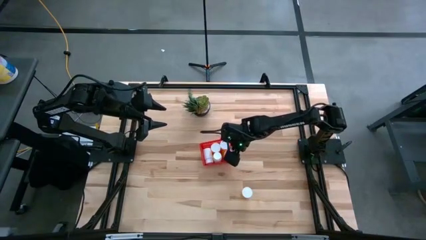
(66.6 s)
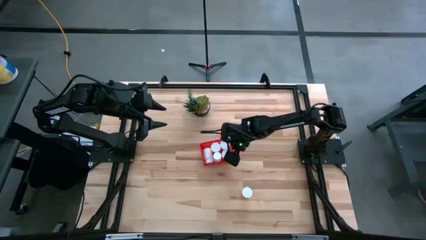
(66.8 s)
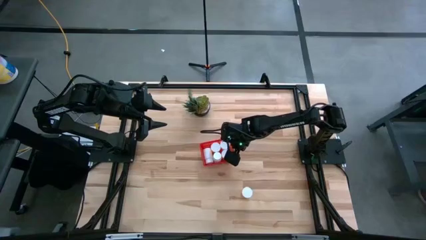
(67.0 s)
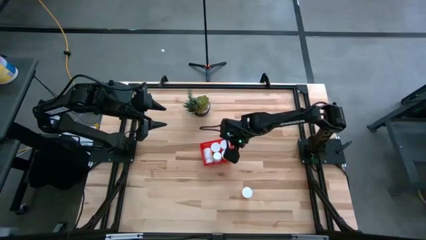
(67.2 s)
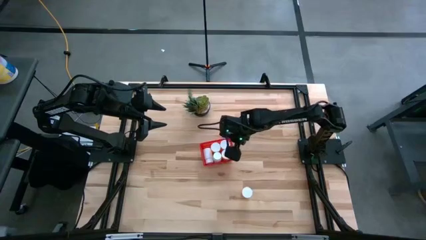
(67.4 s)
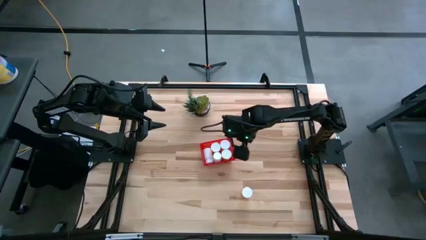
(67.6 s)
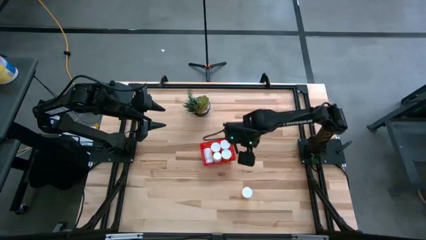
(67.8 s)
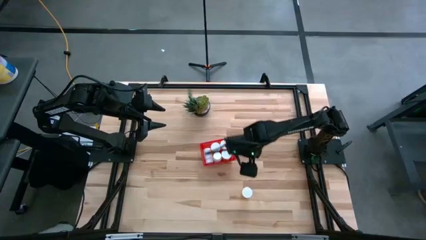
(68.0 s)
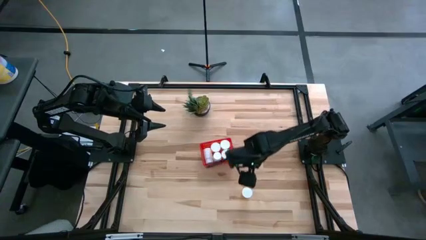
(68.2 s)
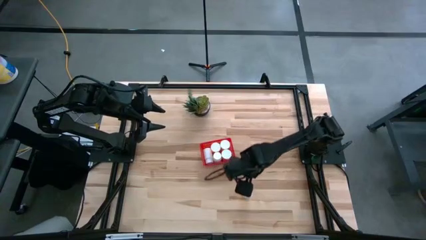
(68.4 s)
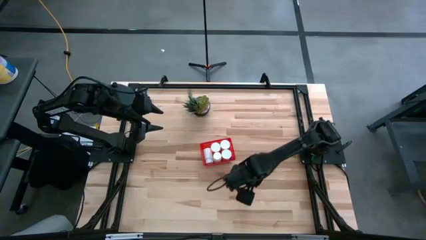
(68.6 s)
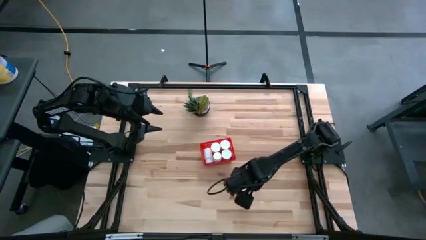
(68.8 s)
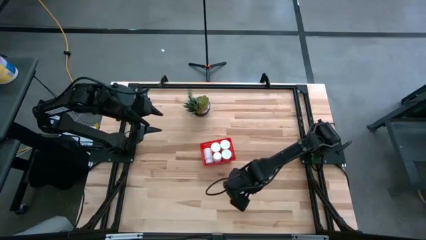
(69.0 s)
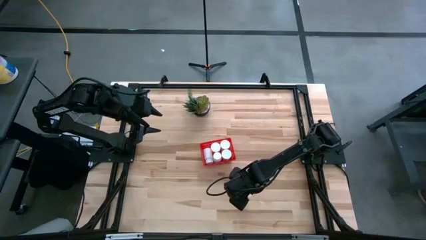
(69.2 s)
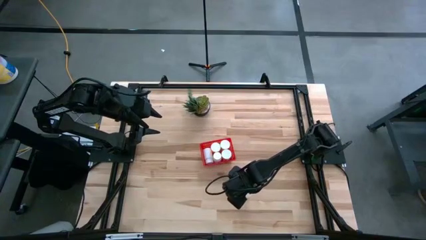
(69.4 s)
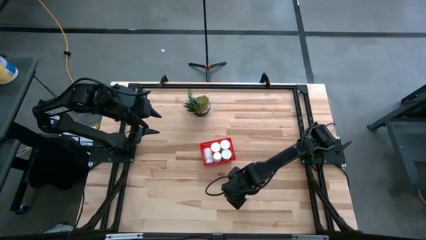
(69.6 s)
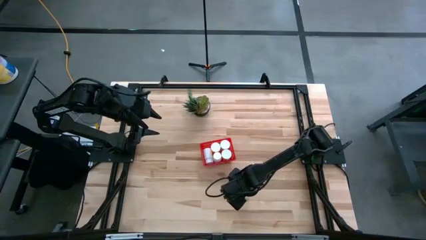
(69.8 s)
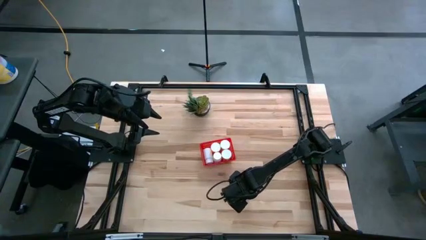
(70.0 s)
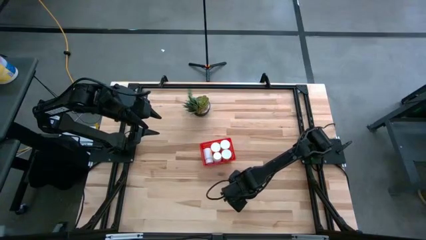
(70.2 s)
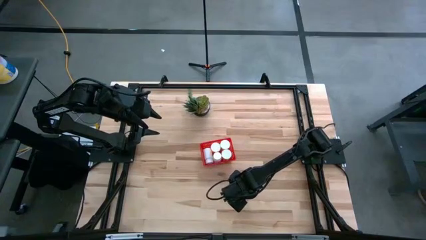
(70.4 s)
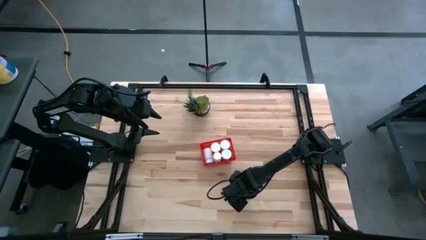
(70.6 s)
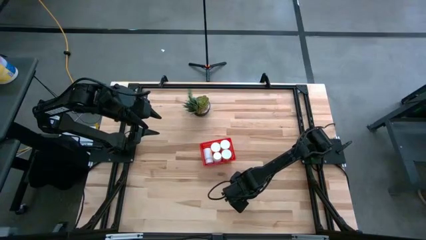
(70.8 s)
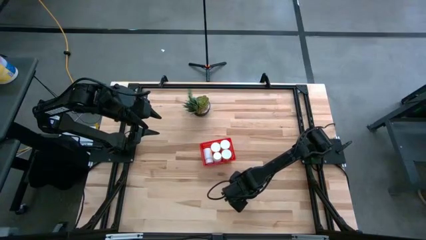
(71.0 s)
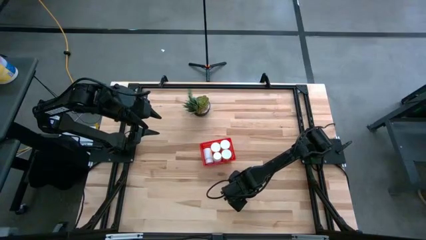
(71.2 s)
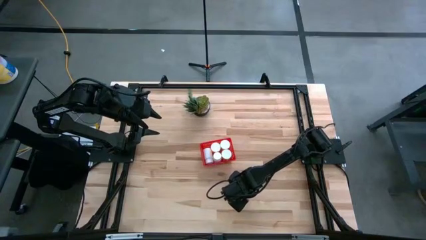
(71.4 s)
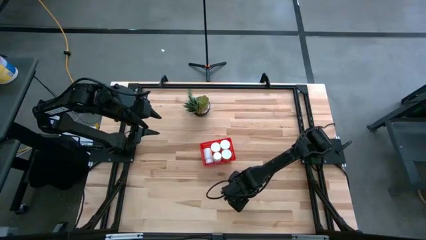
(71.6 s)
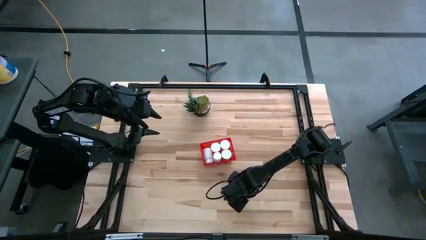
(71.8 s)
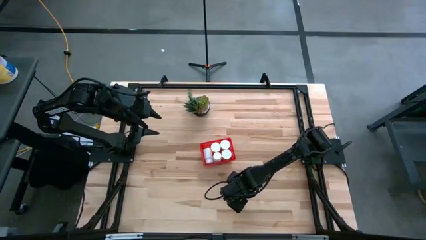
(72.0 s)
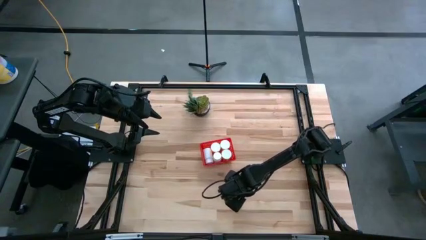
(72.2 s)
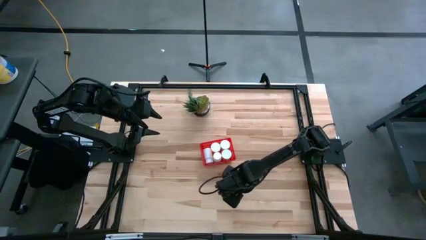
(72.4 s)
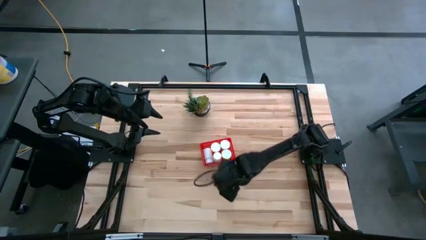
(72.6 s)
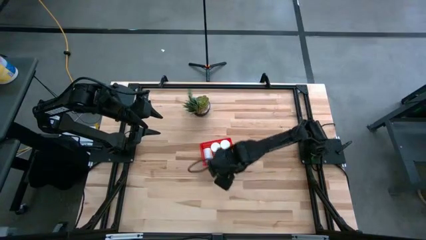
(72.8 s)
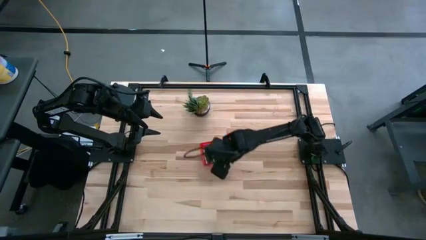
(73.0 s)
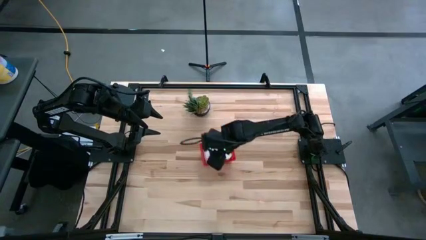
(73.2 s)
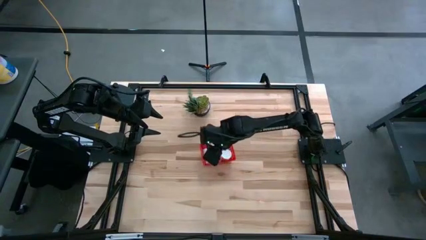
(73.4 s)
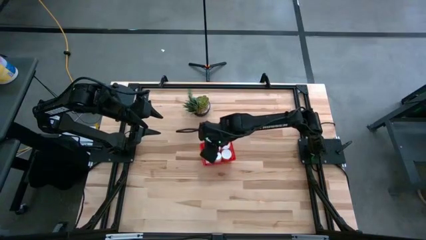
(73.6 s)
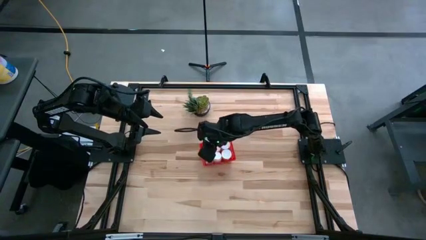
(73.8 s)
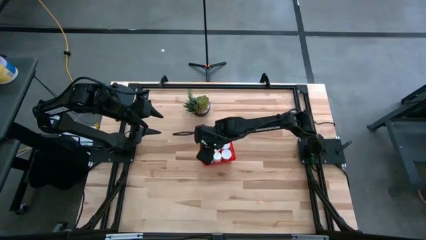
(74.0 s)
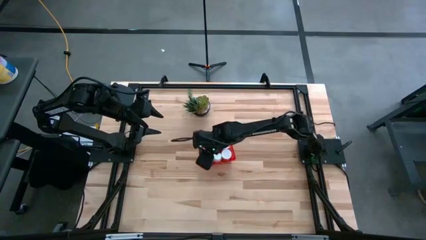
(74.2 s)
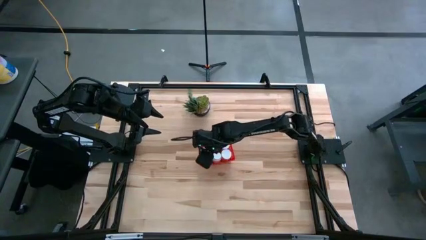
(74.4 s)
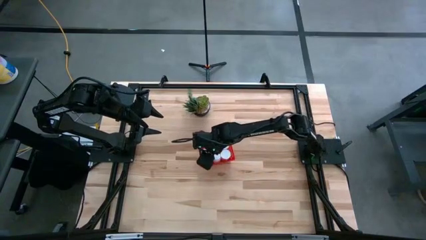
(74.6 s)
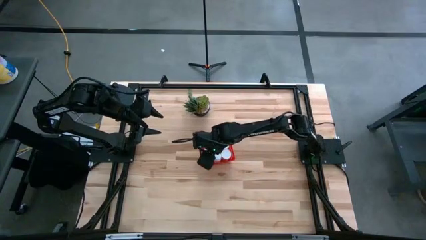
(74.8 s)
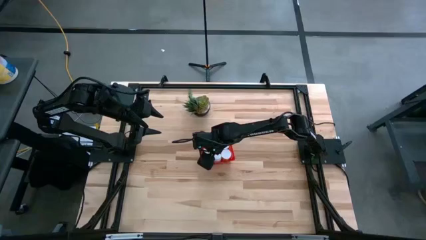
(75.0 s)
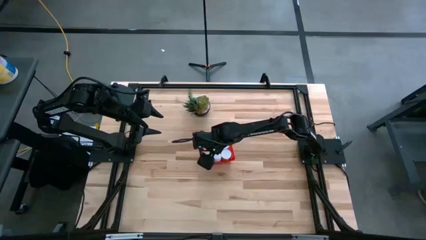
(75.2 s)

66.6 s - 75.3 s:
Task: Pick and place pill bottles into a basket
Put the orange pill bottle into the red bin

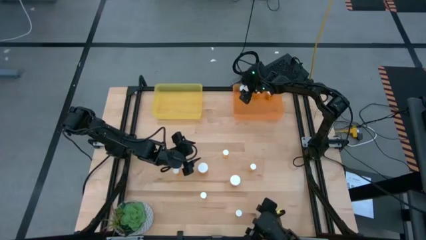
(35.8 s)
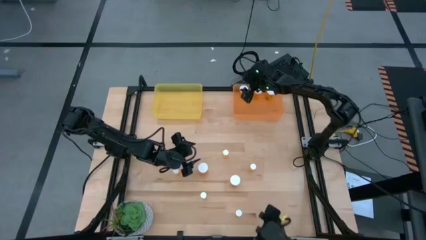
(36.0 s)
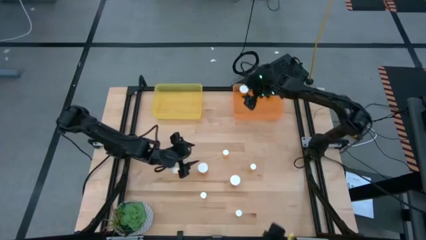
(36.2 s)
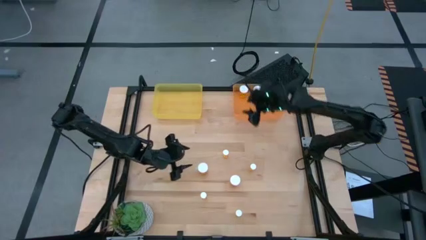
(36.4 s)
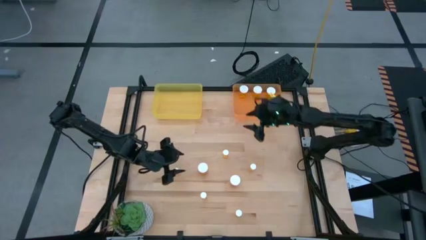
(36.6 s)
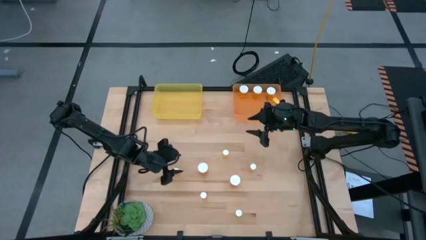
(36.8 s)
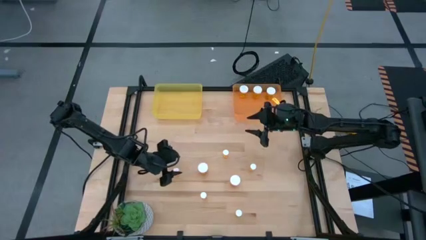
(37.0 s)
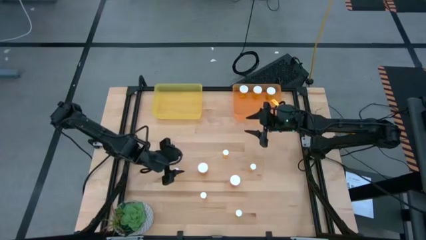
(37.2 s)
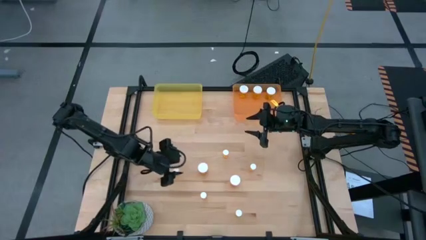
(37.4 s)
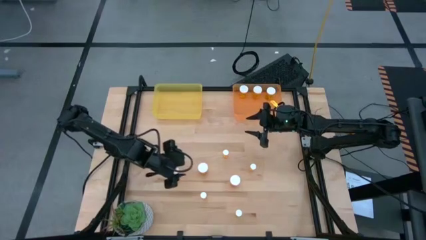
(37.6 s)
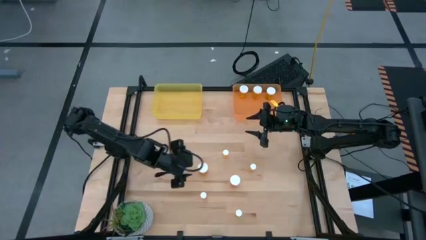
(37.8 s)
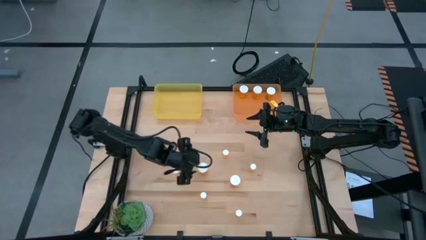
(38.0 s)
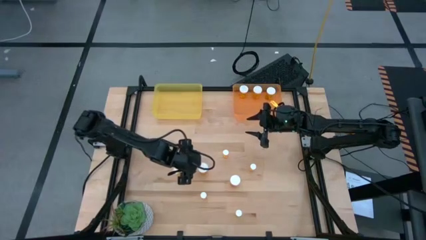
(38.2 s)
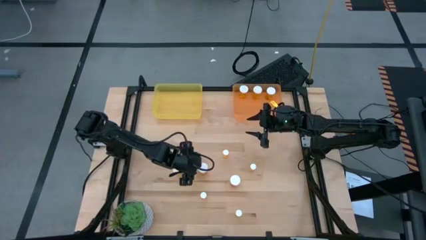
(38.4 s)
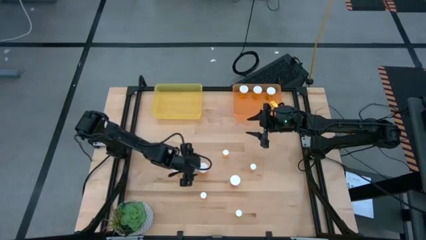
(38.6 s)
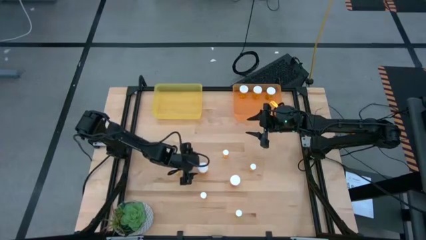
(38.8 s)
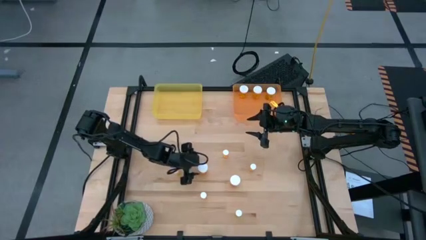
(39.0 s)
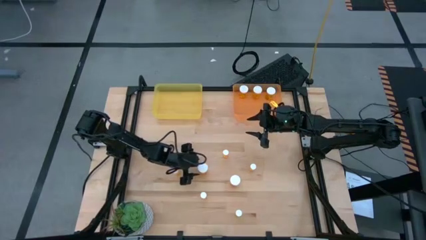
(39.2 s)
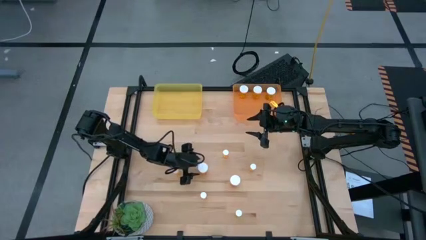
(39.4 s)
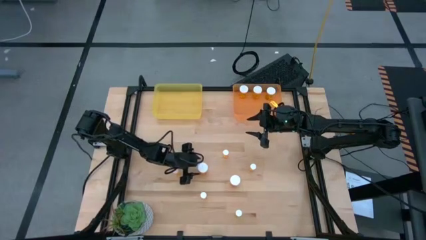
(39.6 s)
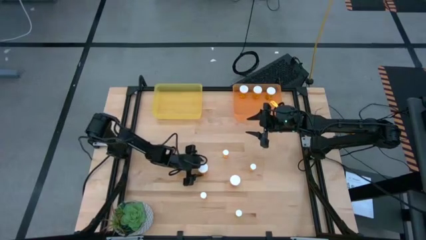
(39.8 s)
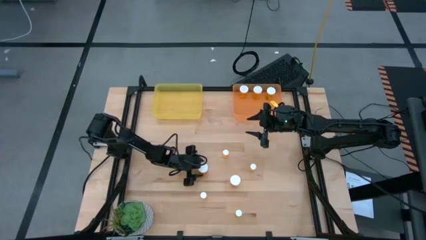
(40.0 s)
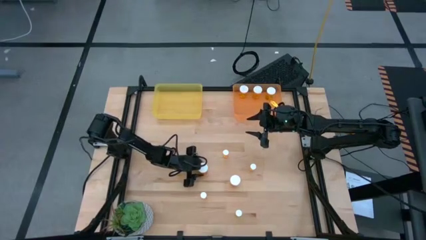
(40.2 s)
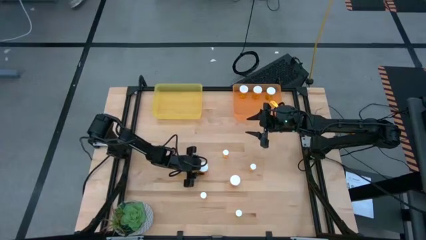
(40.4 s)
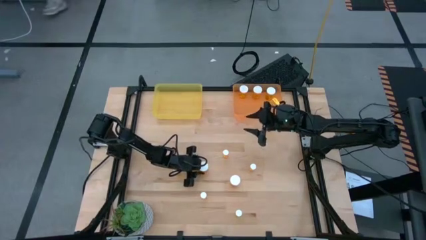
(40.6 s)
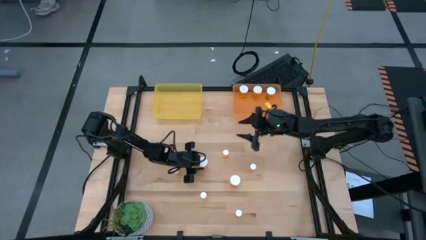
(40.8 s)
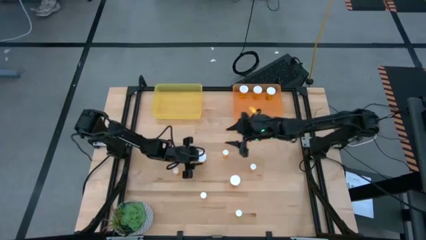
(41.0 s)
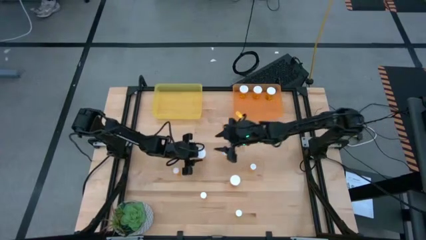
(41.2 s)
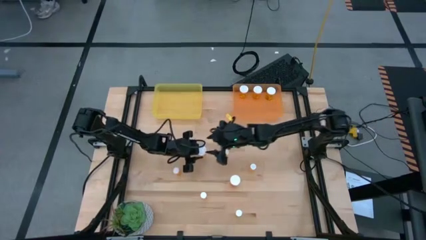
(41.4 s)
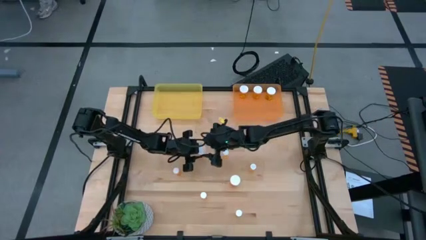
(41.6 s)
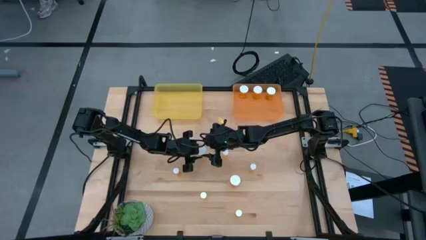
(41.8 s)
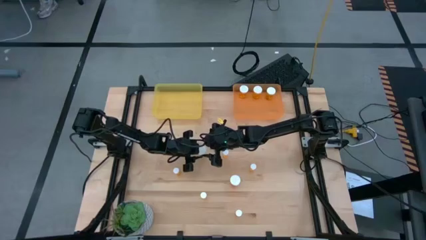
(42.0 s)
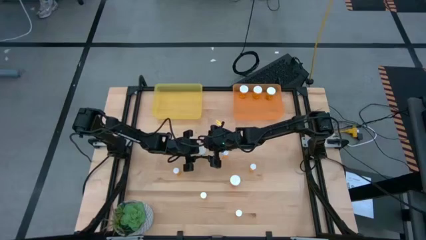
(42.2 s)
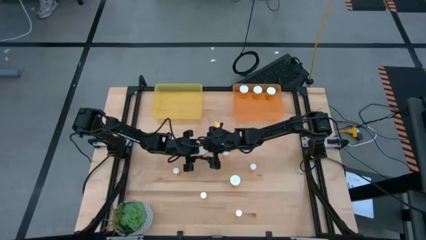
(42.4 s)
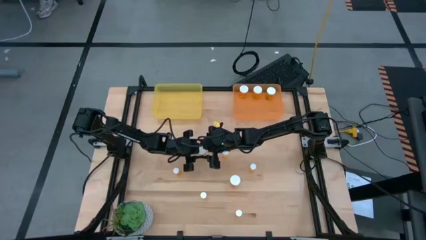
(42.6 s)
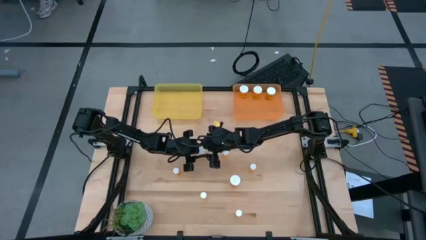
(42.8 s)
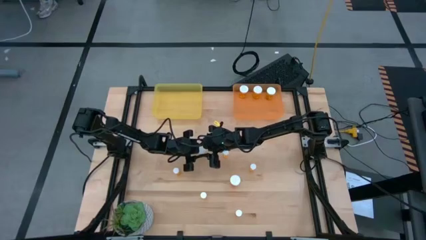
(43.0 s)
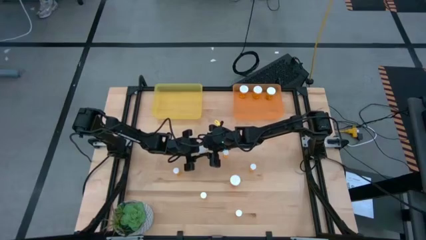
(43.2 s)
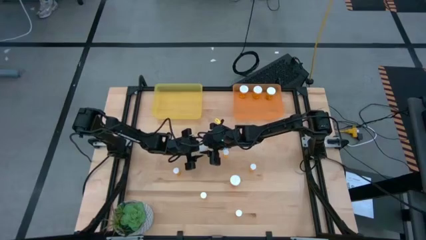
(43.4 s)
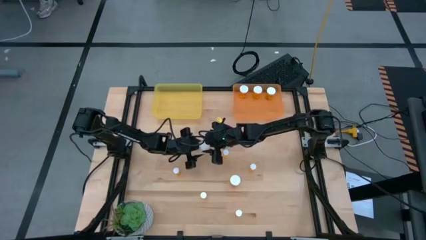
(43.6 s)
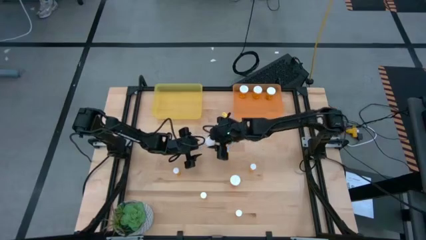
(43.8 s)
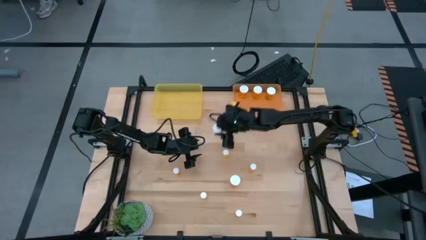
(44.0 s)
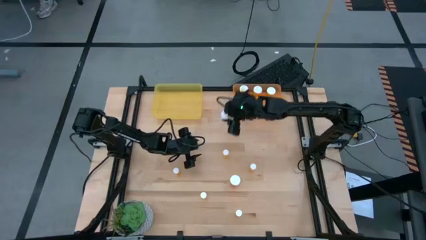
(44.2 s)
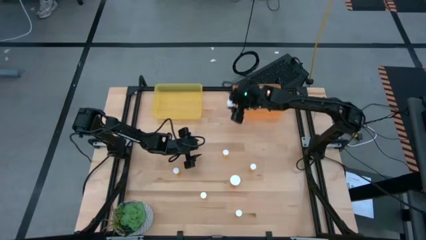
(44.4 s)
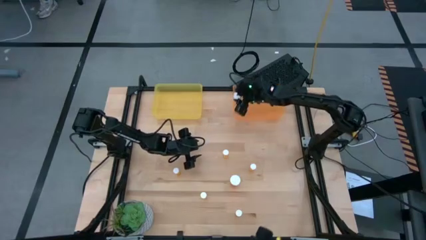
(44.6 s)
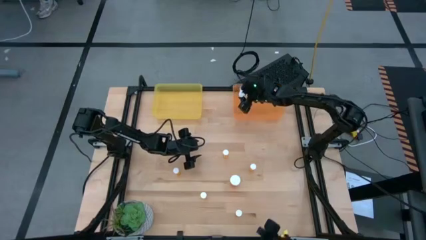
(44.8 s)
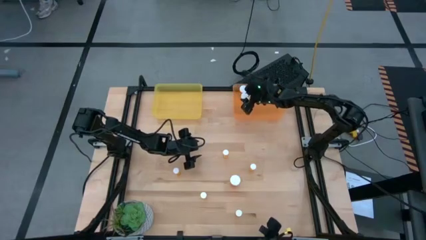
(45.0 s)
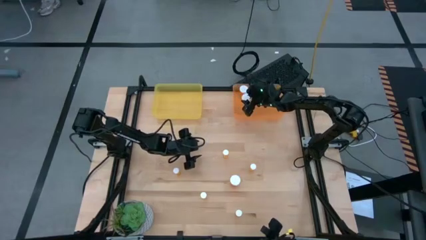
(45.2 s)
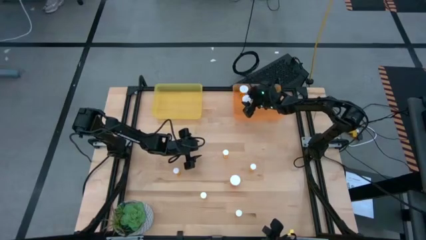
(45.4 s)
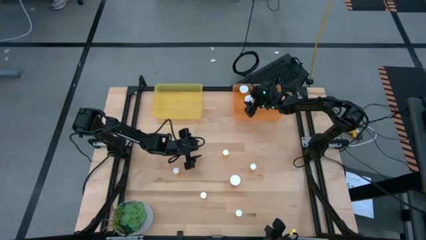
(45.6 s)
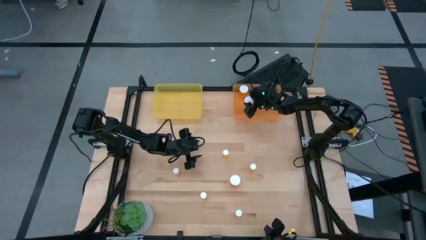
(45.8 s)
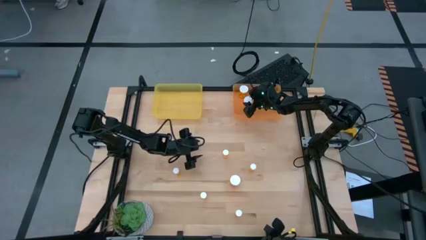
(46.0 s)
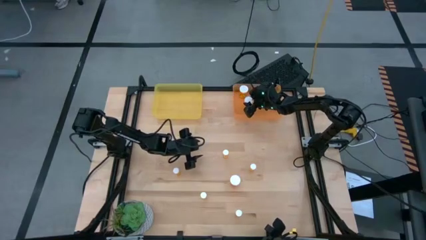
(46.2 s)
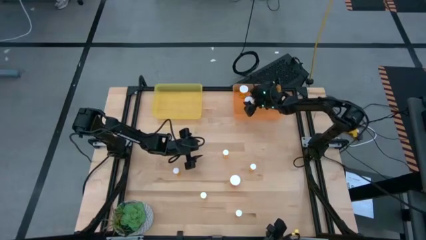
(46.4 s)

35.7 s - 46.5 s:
Task: Pick and place medicine bottles into bin by pill shape (circle, oval)
Put the big yellow pill bottle into the transparent orange bin
